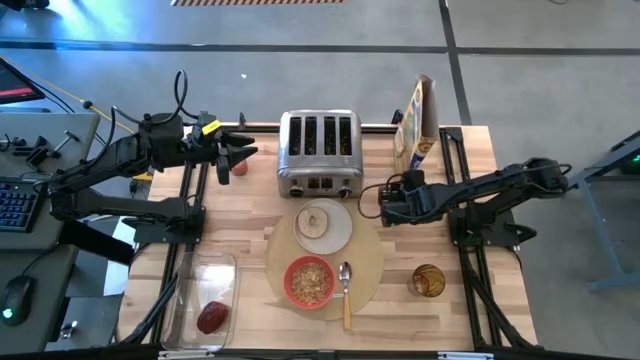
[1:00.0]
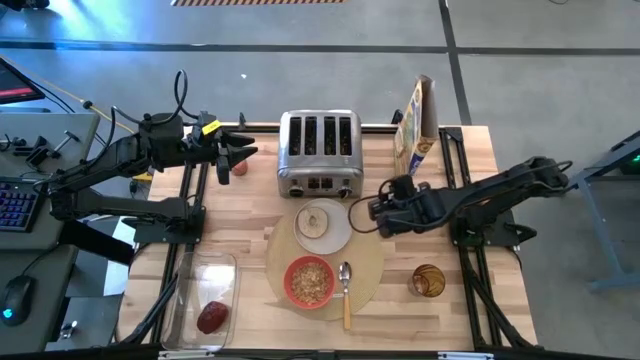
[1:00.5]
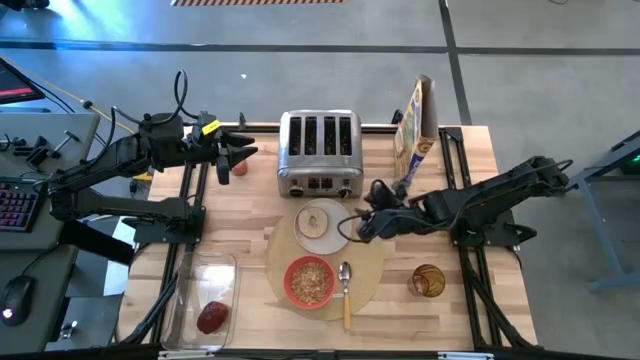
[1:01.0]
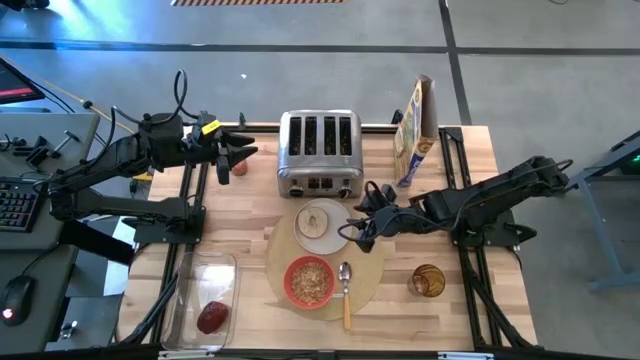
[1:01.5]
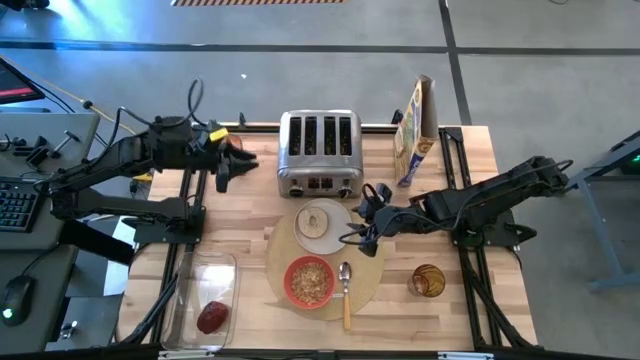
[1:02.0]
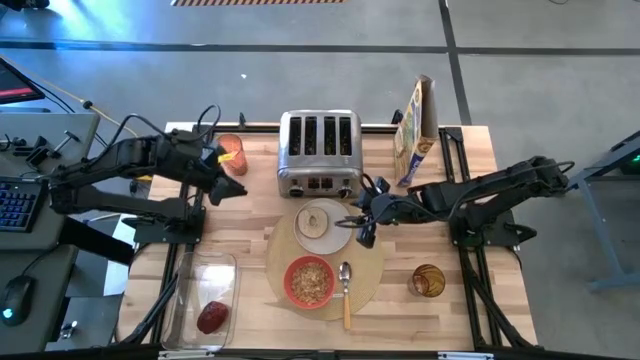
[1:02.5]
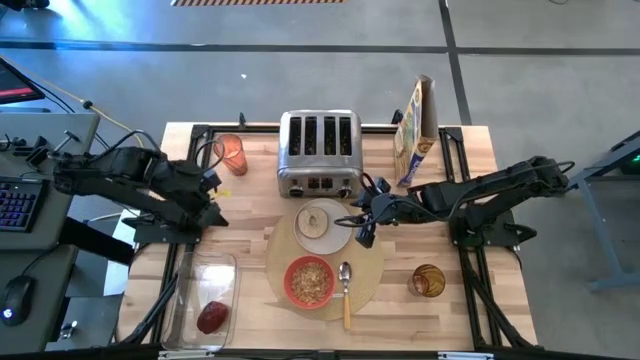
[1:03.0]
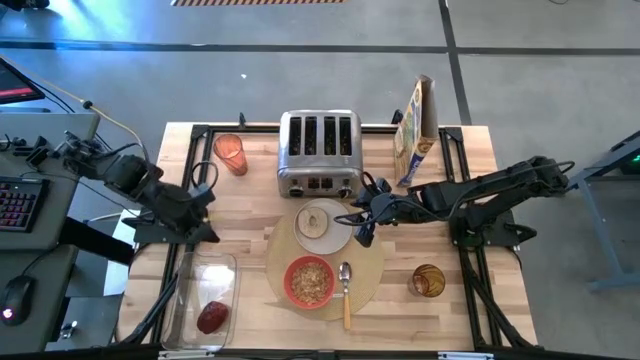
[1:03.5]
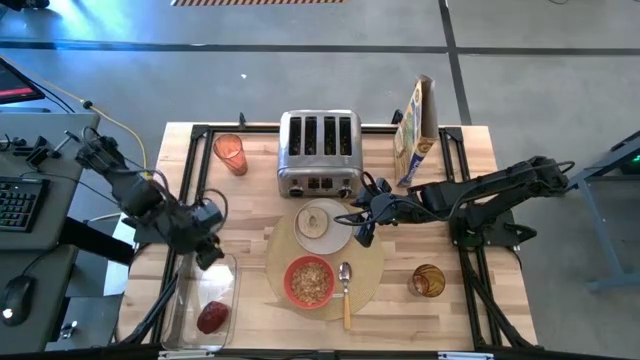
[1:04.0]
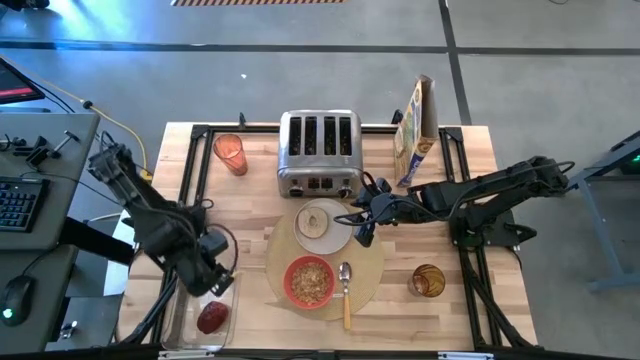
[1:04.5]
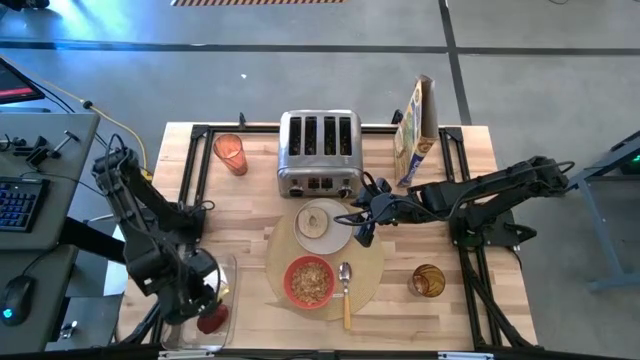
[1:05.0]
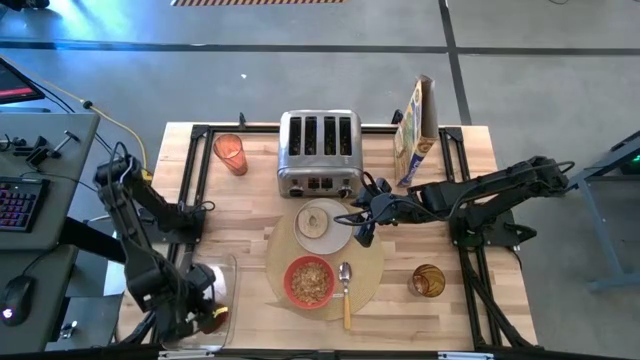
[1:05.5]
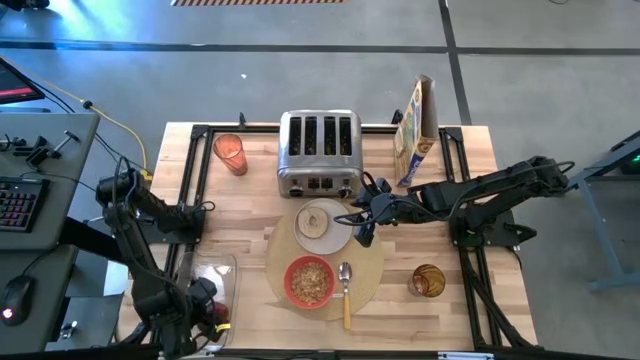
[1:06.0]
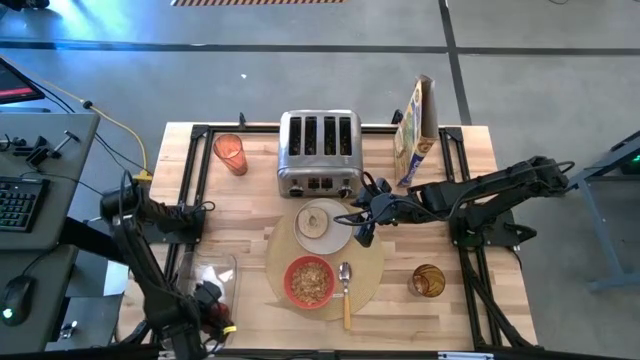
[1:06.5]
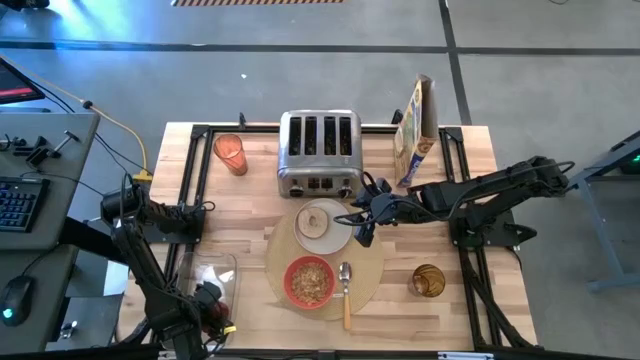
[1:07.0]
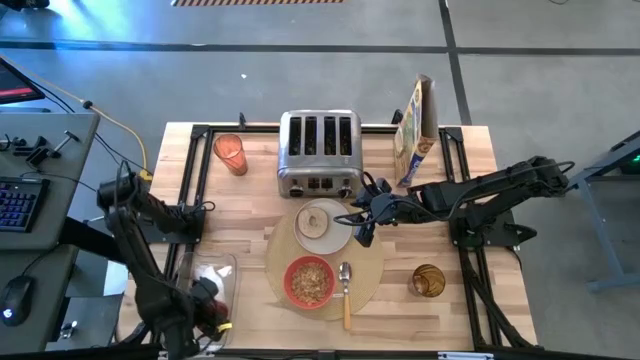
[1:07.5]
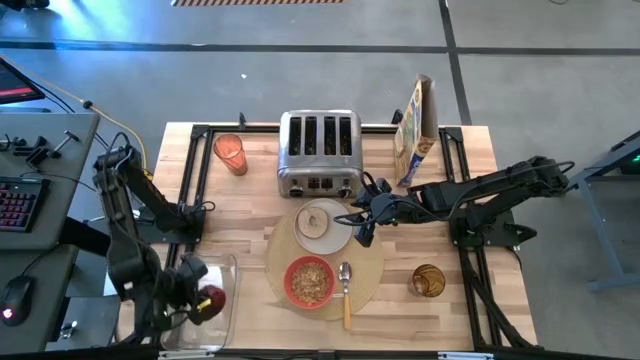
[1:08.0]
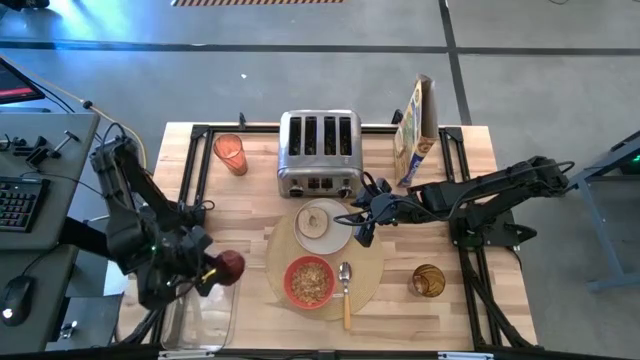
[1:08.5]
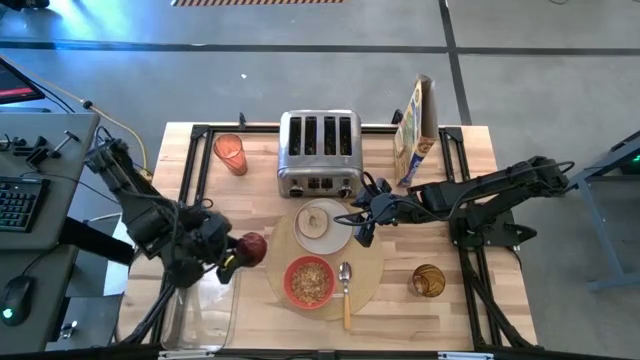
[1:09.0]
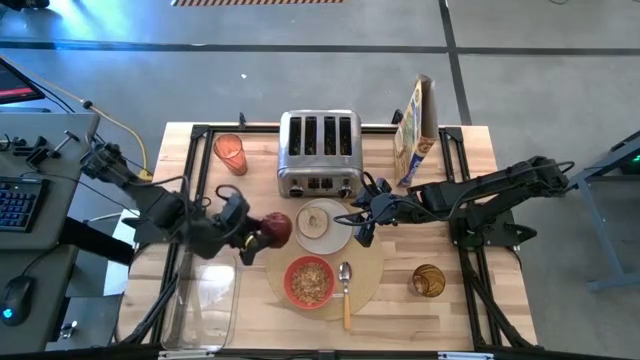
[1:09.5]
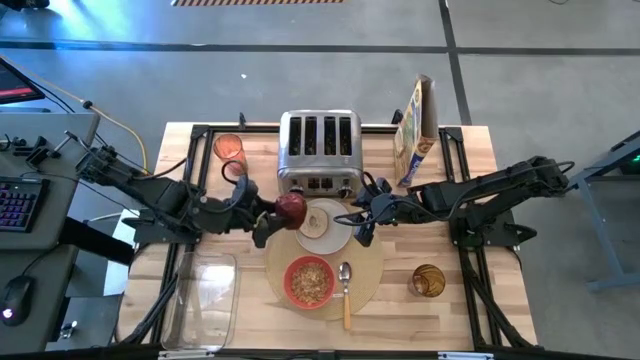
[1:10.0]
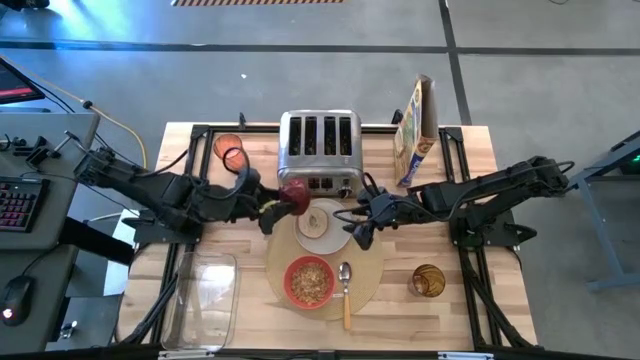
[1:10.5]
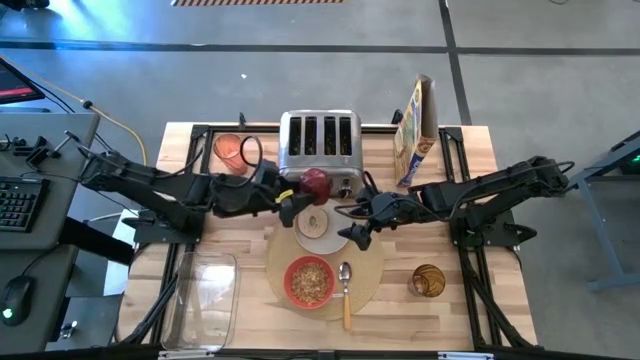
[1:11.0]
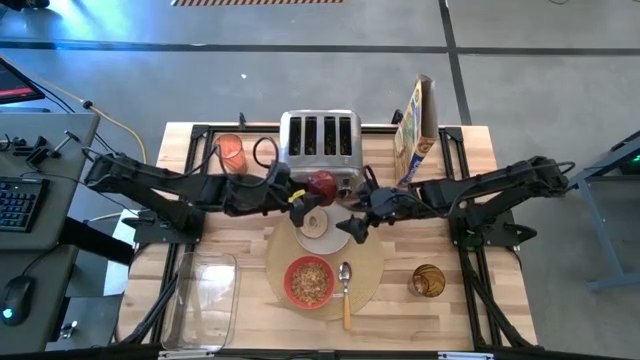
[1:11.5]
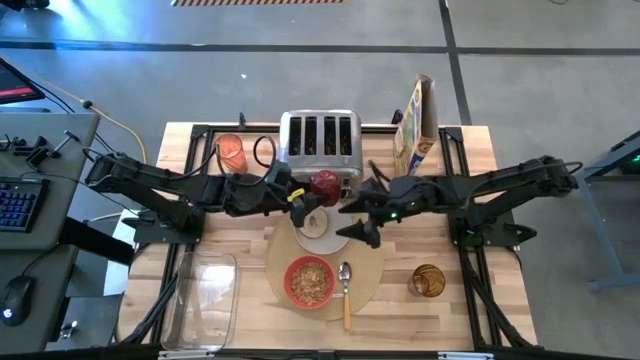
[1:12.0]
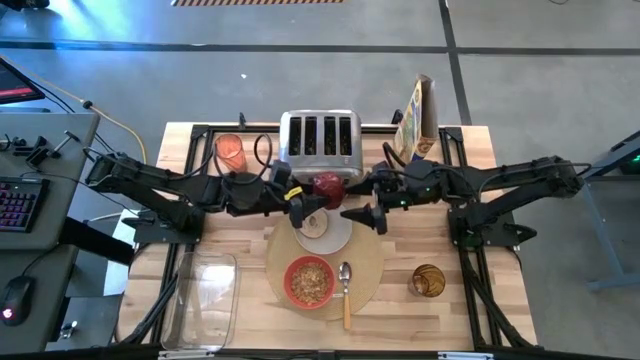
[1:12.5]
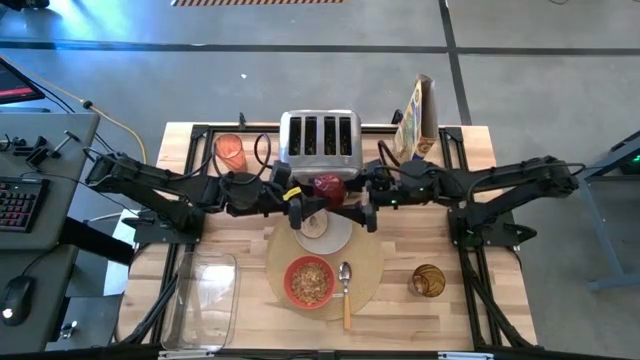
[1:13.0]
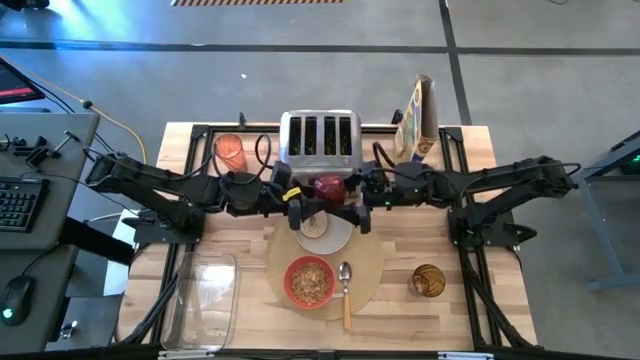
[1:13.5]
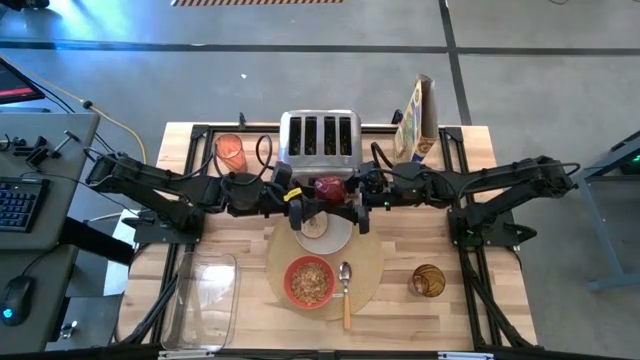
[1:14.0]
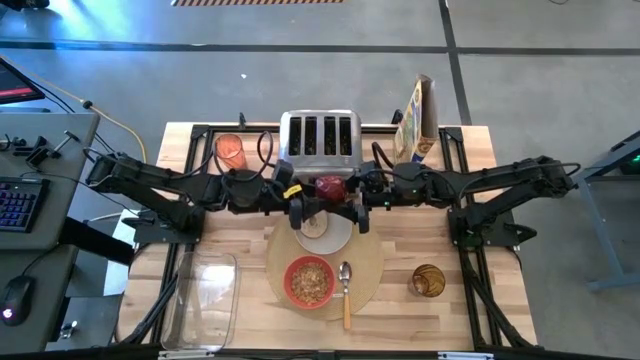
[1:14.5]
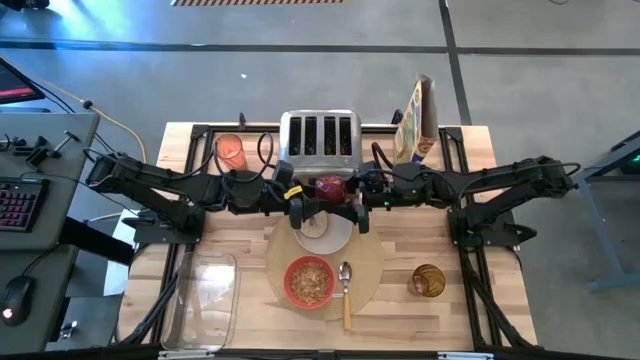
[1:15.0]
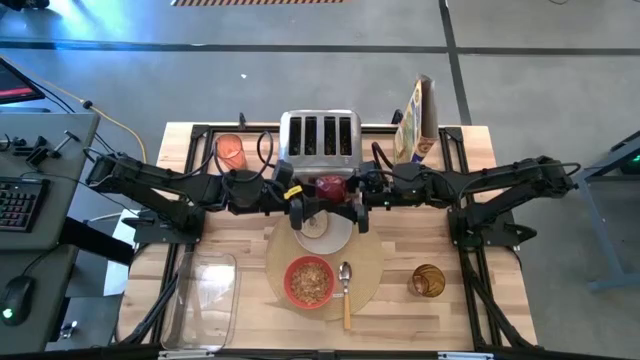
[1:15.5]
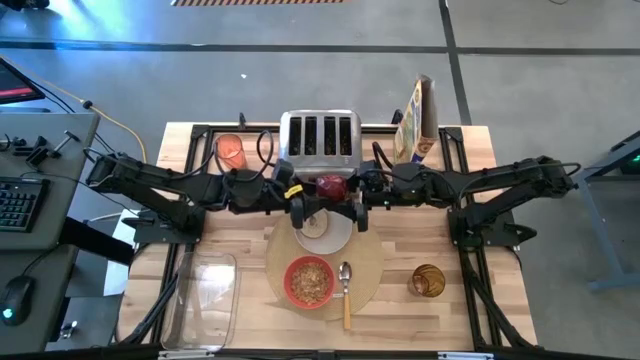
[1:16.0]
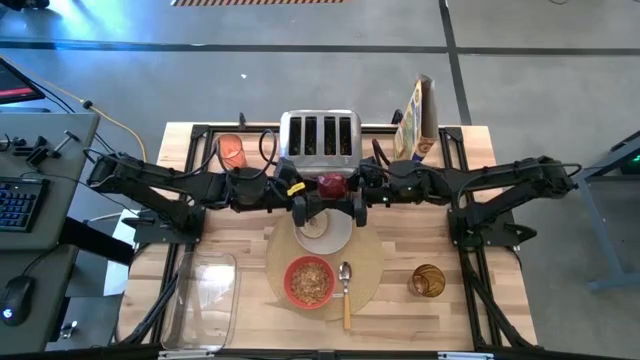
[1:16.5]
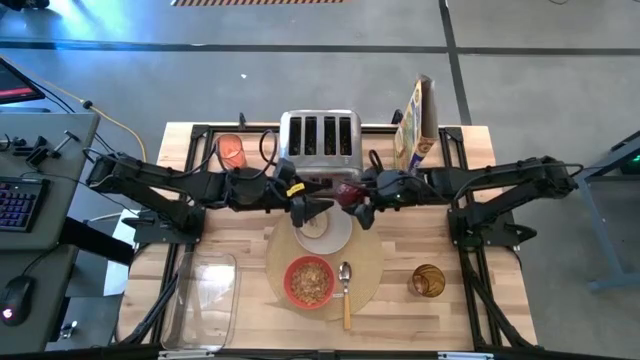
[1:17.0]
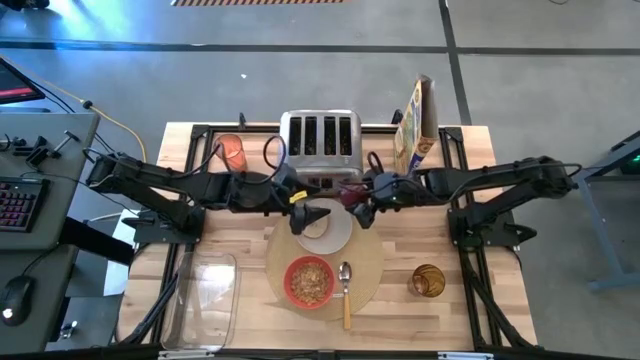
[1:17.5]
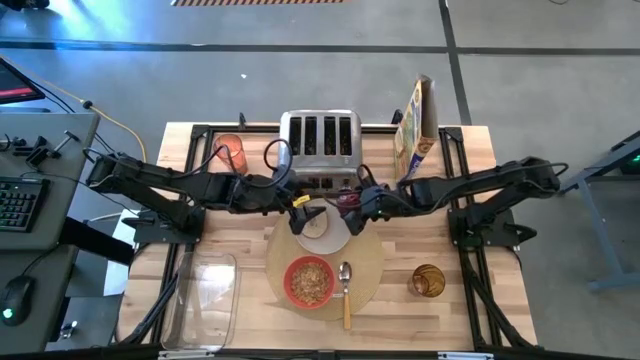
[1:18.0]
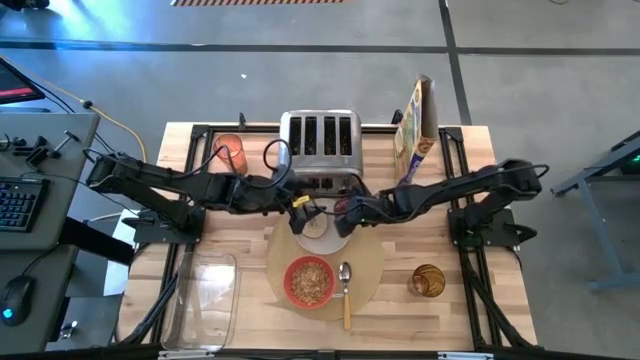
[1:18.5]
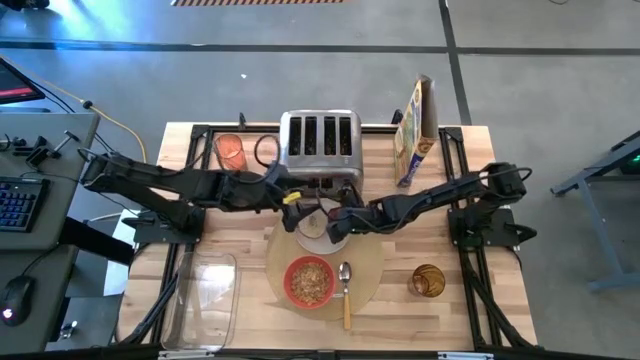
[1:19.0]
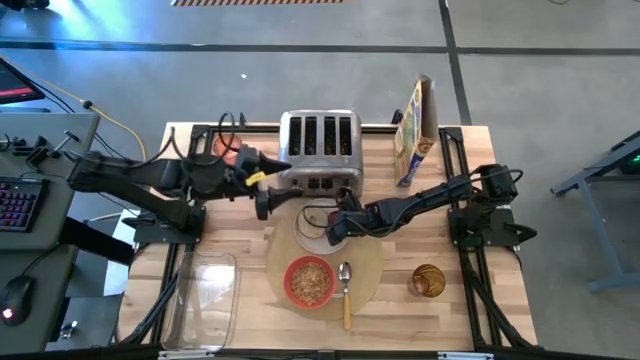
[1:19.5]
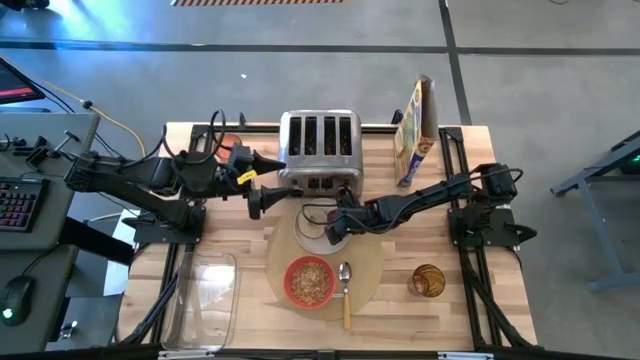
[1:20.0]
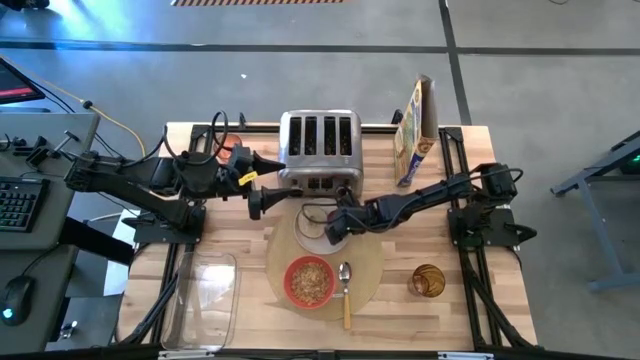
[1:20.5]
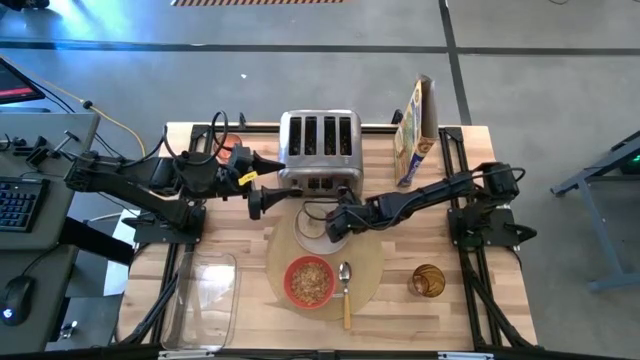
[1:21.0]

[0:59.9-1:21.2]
Task: Arrange a breakfast setting
Put the apple on the plate

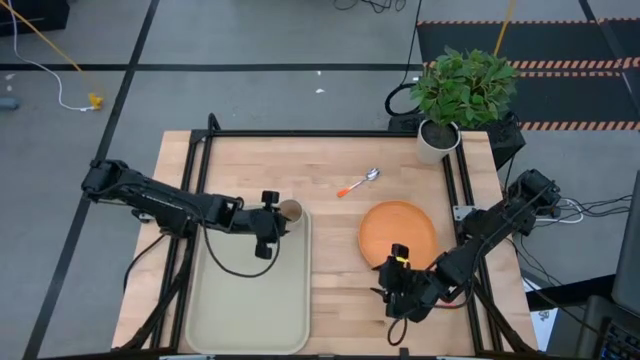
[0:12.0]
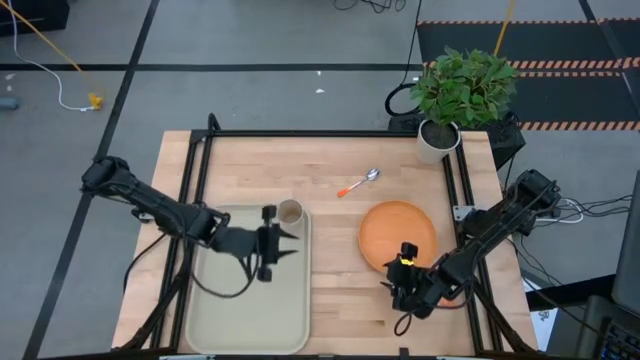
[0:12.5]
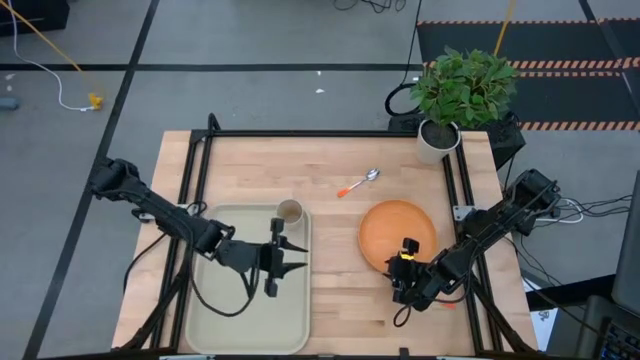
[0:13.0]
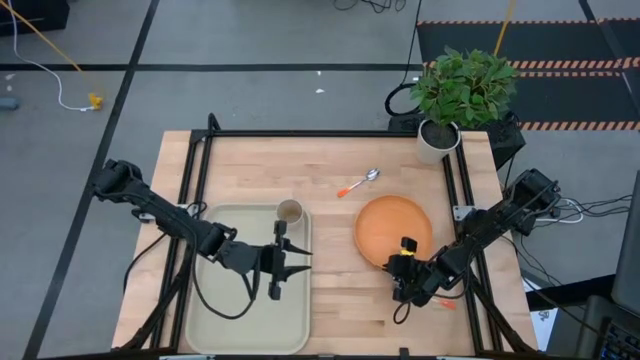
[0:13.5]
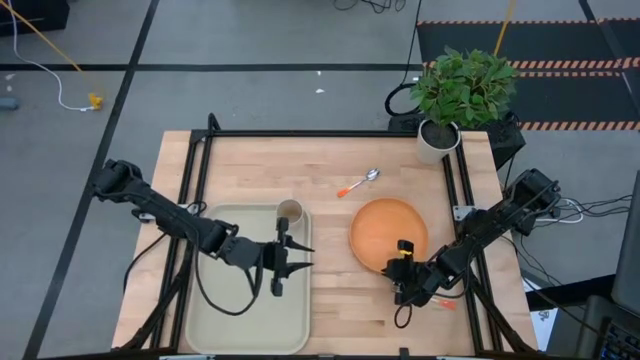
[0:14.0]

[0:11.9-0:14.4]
Task: Pick and place plate/cup/fork/spoon on tray
Put the orange plate on the light yellow tray to the bottom right of the light yellow cup
